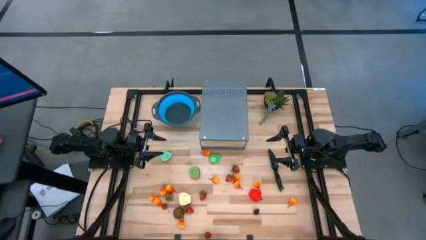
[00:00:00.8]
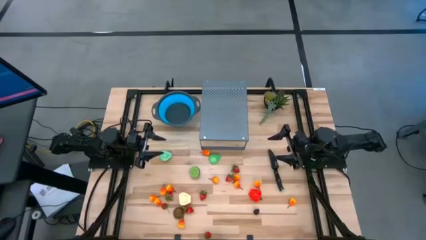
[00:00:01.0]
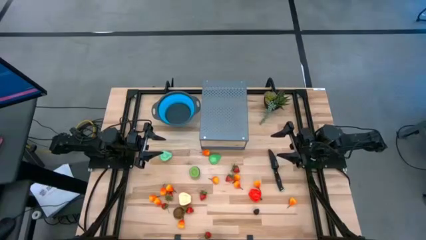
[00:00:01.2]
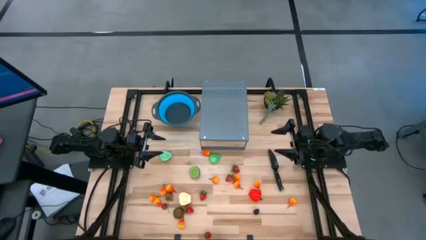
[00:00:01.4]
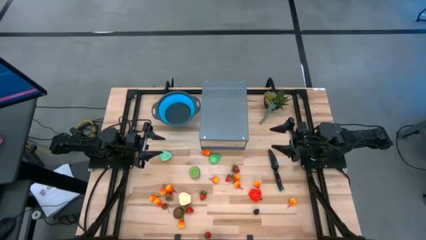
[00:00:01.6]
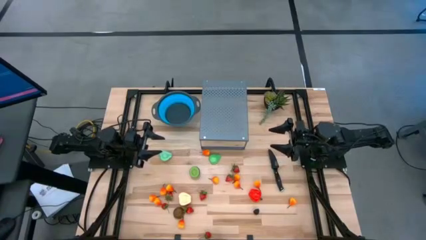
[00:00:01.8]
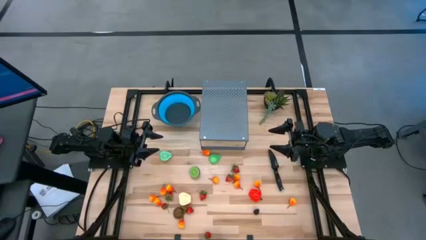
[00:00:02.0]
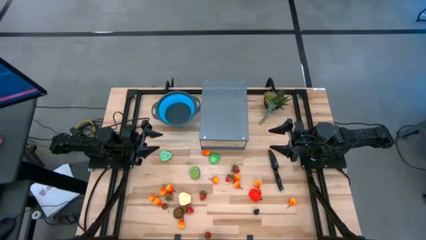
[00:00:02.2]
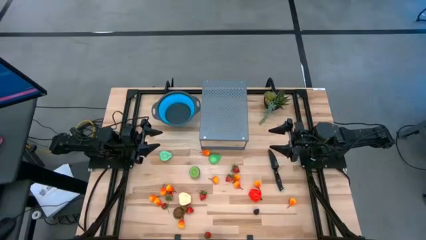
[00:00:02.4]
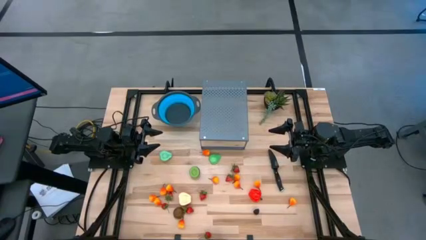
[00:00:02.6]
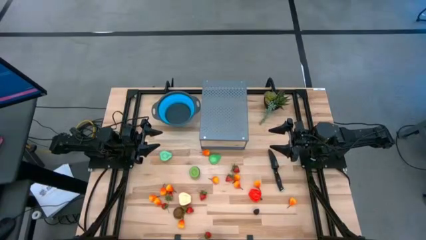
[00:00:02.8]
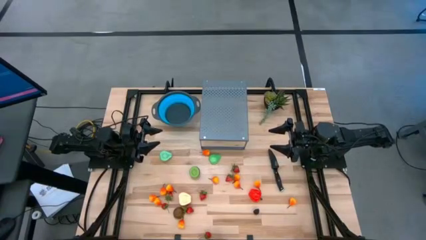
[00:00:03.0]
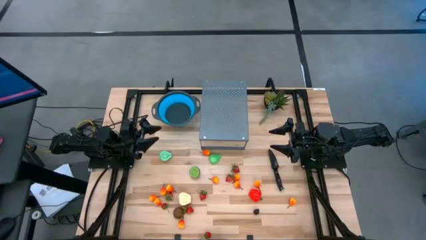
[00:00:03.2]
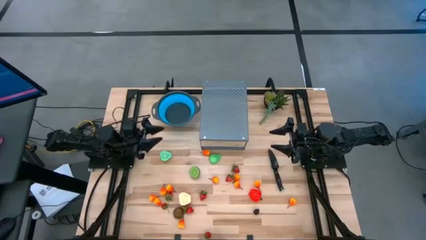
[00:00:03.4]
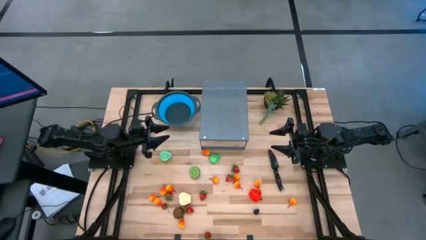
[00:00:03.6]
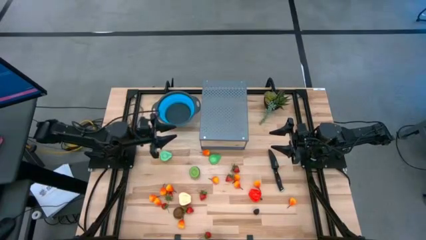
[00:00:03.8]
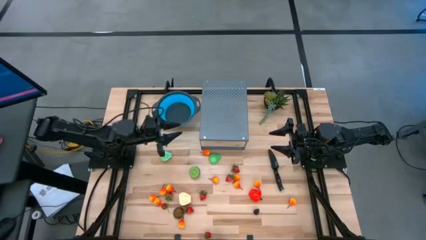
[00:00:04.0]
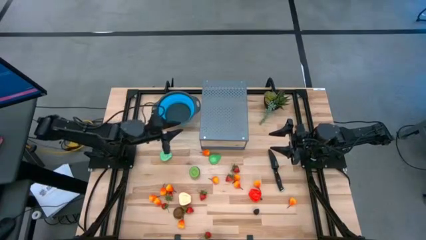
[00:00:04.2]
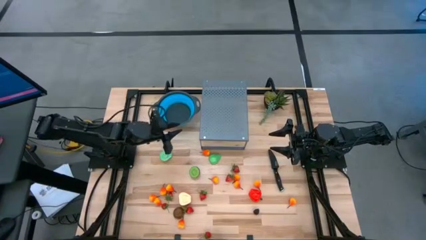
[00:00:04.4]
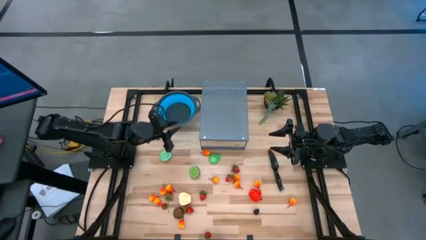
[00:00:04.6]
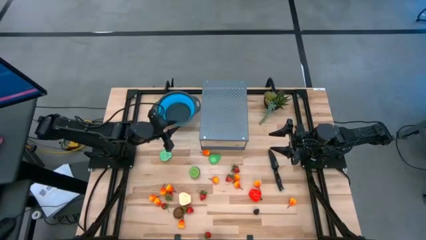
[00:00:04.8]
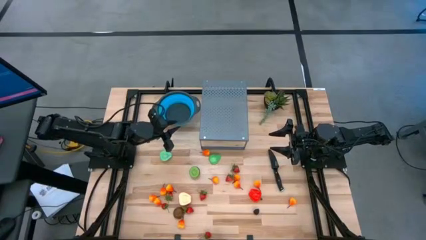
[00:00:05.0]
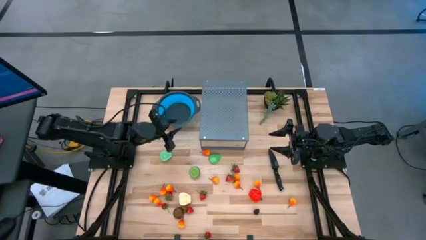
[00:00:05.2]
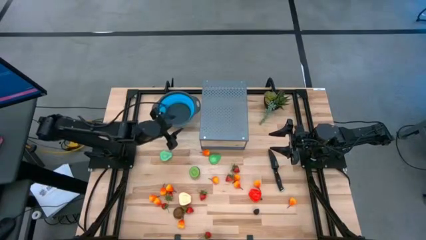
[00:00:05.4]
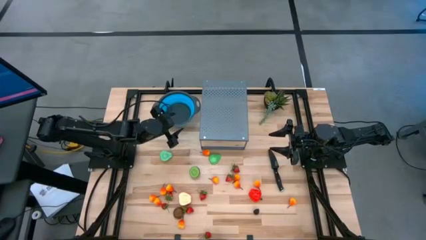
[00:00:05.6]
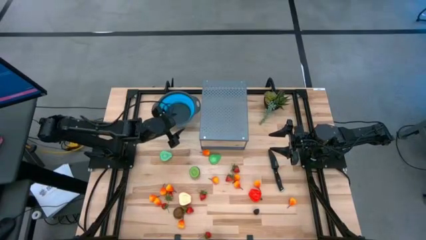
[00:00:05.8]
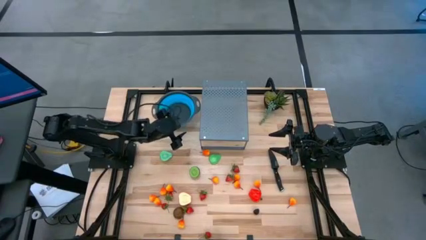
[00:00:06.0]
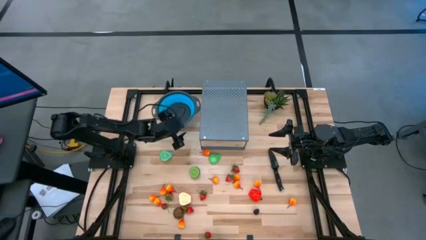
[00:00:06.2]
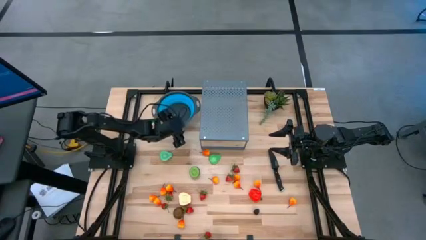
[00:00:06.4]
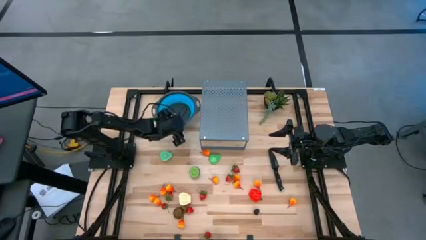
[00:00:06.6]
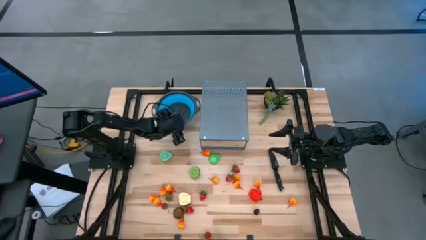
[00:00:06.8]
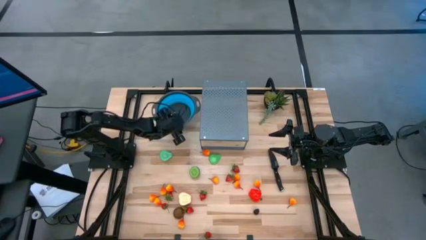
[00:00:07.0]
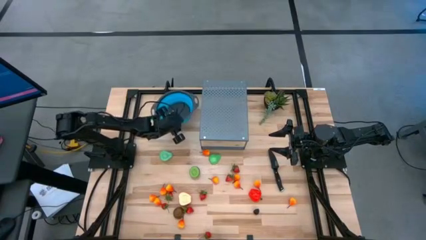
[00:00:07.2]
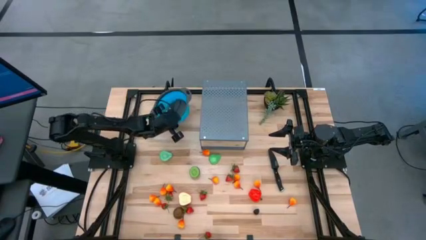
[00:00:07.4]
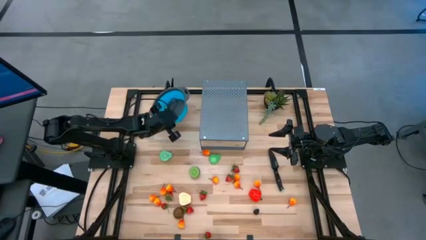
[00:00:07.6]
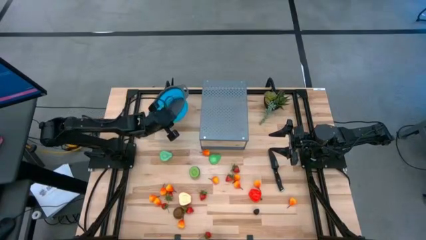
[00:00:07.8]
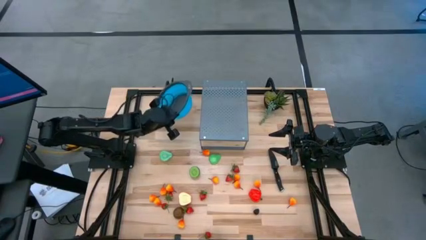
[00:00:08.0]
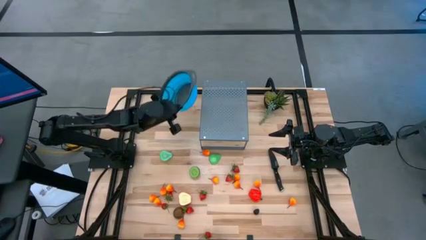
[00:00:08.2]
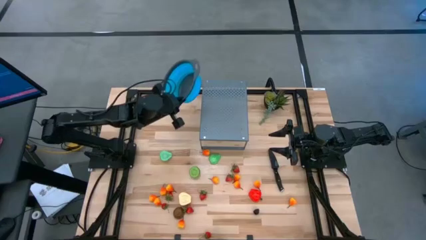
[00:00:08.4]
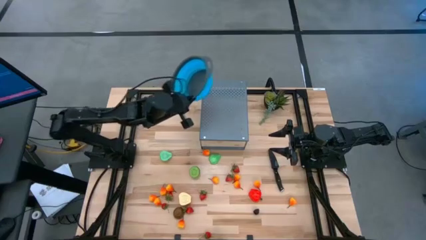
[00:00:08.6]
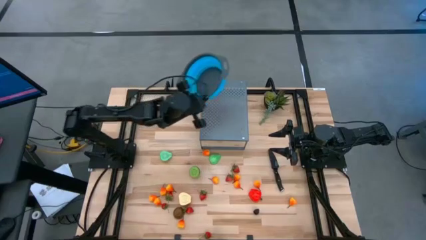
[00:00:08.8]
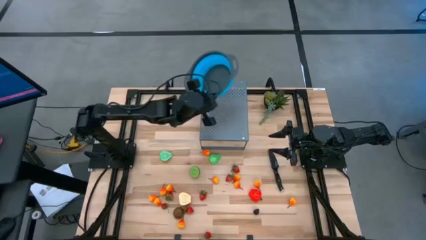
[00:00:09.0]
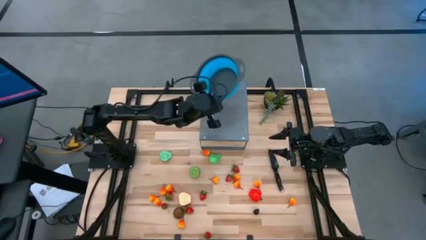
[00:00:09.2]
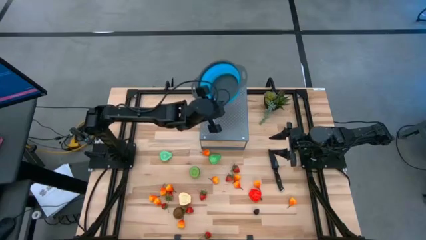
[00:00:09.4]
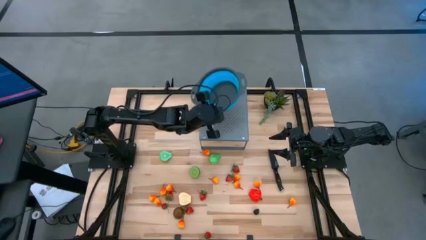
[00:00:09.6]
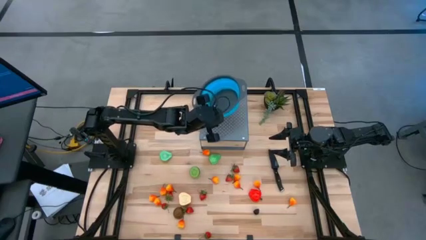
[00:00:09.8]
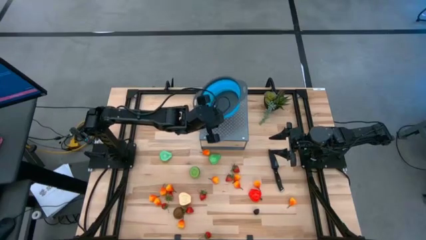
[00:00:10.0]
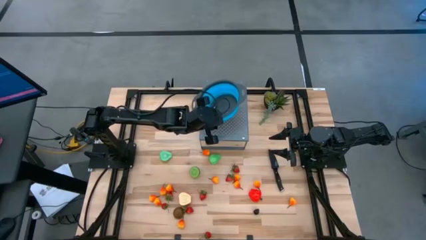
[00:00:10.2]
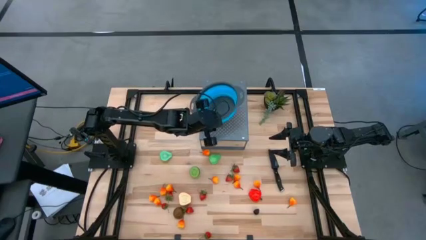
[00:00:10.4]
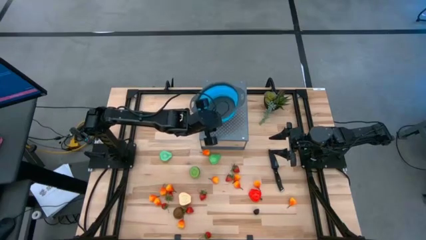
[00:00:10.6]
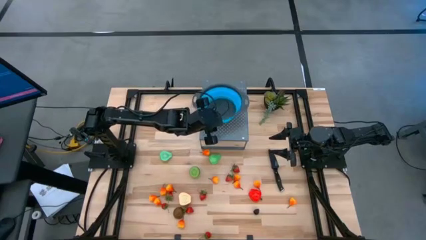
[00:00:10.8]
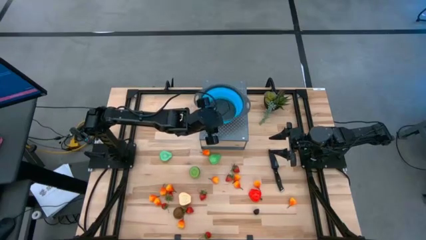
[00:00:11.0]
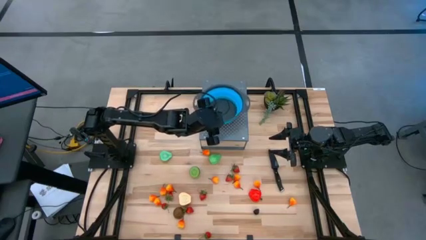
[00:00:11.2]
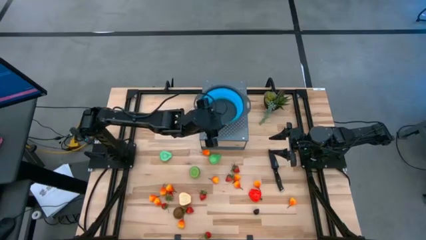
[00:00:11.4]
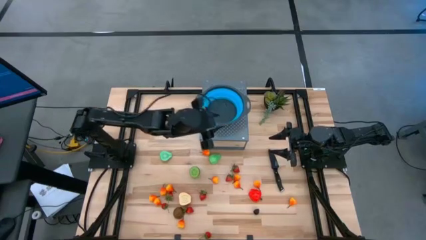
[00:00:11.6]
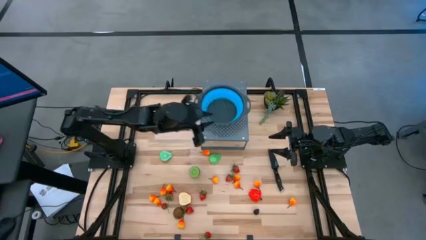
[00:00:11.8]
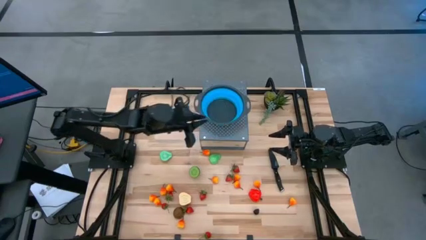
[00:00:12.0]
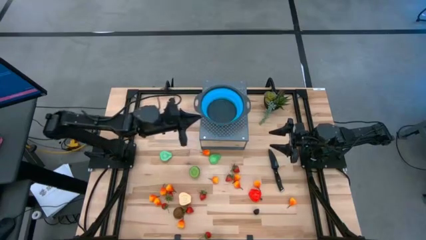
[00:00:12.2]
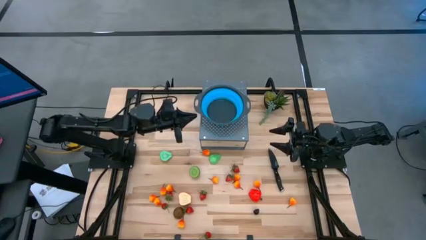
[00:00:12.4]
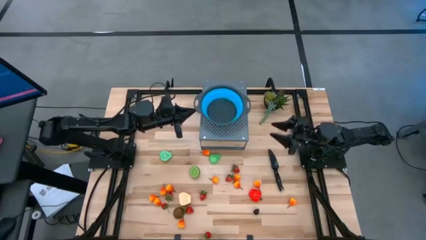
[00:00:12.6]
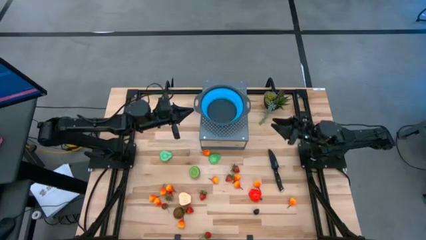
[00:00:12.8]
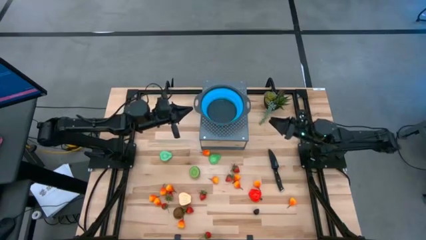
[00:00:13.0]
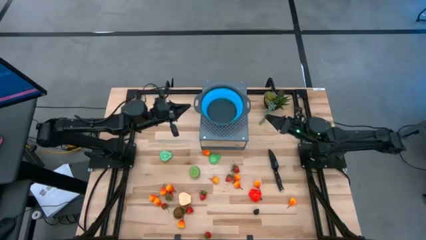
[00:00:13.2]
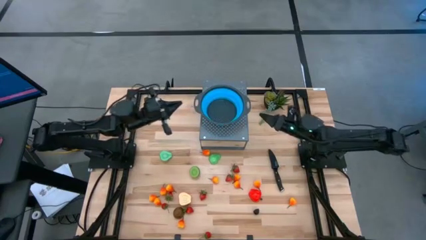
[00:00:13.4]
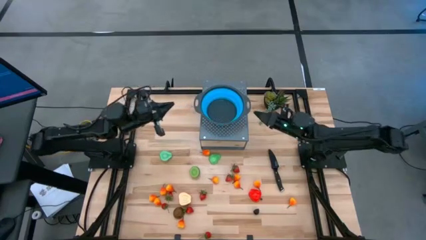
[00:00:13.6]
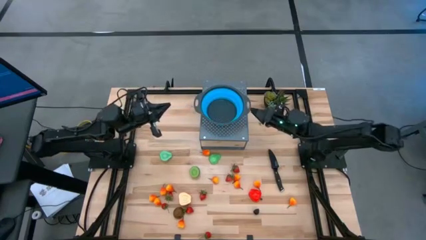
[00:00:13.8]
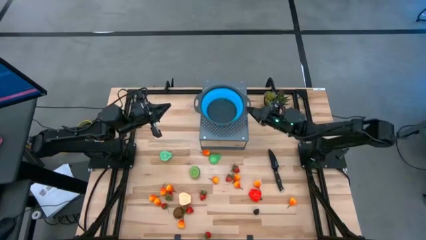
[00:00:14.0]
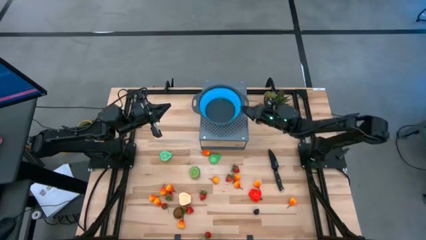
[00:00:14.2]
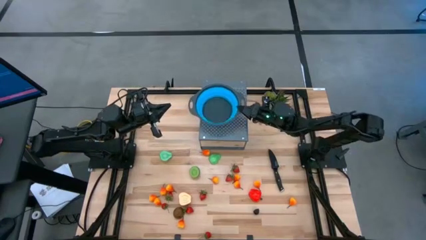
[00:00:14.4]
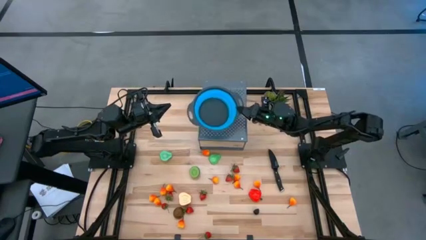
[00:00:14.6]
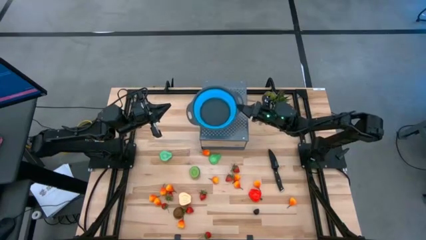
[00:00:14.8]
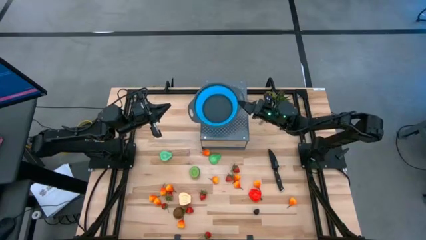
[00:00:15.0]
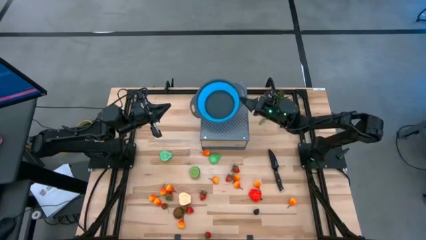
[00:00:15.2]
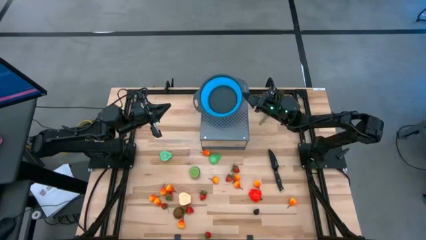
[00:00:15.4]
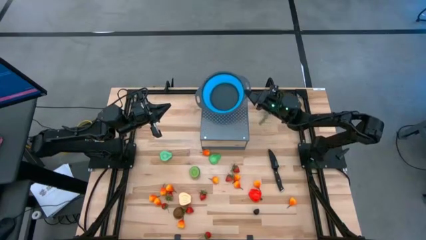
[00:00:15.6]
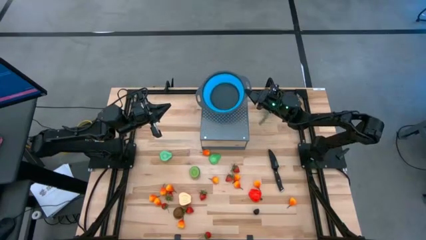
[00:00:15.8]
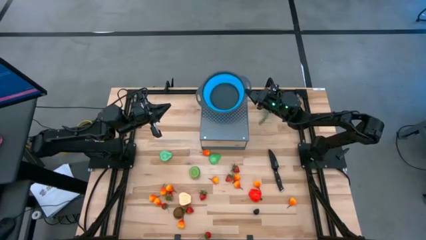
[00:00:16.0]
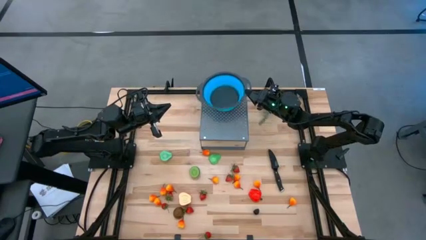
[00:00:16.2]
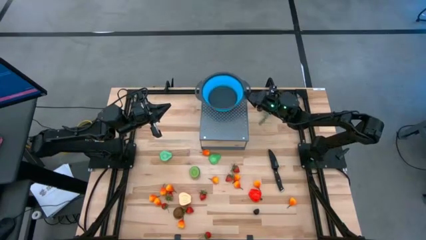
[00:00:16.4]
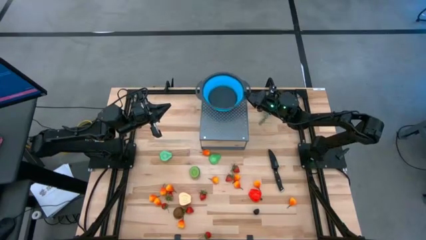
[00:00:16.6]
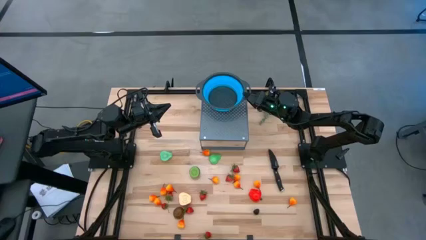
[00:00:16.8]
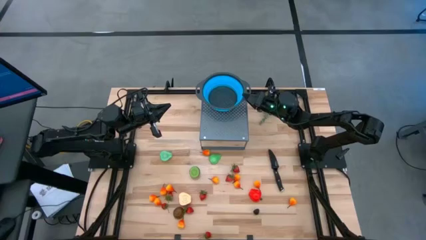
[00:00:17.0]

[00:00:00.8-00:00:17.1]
Task: Pick & Place Fruit
Put the strainer bowl on the shelf
